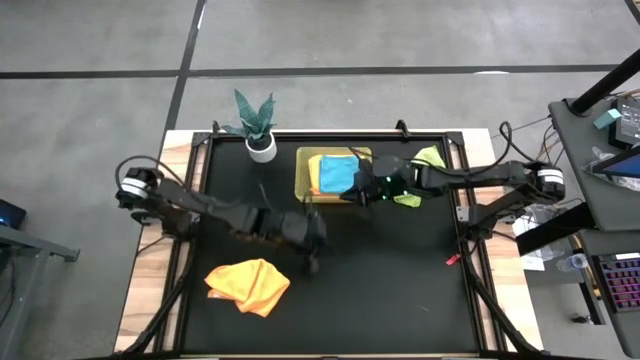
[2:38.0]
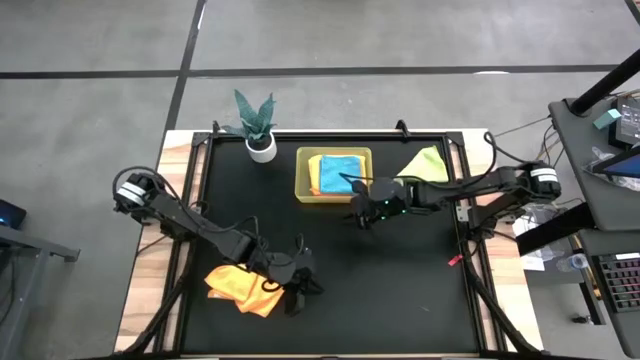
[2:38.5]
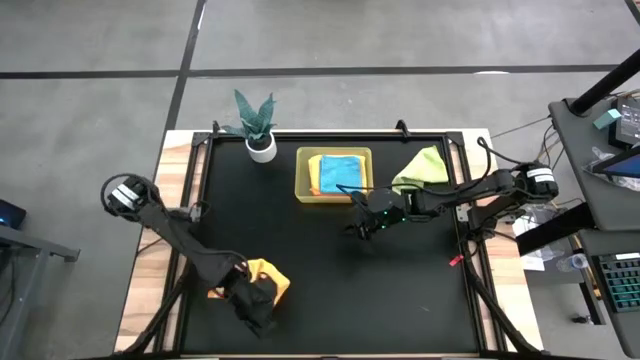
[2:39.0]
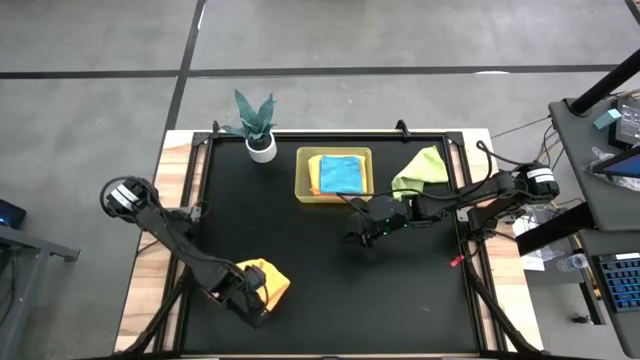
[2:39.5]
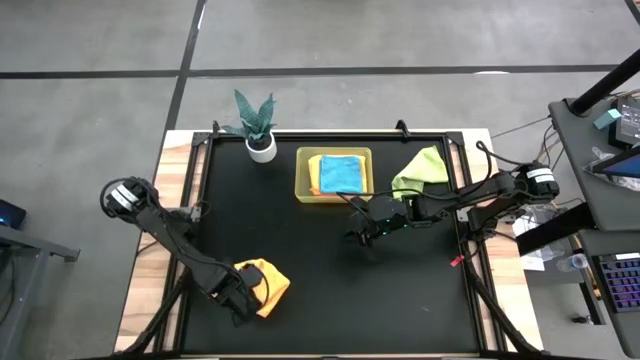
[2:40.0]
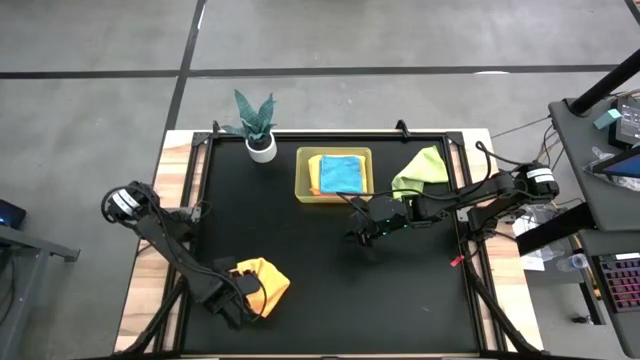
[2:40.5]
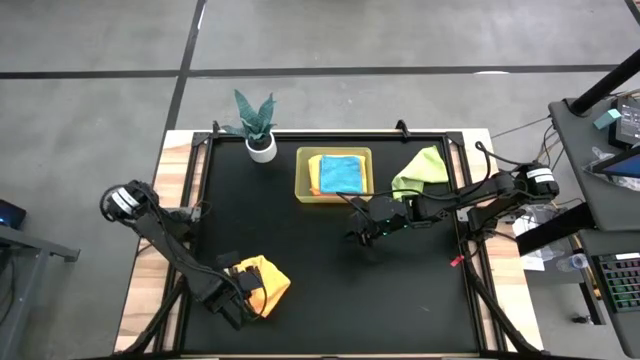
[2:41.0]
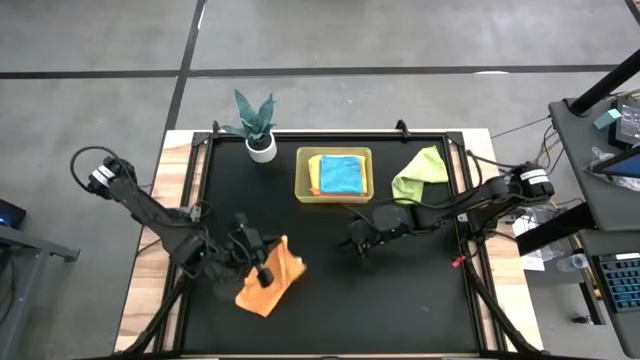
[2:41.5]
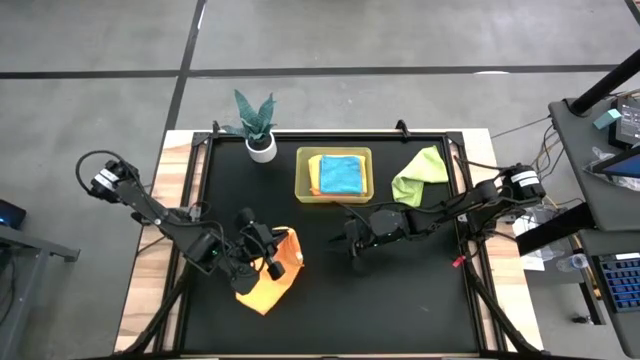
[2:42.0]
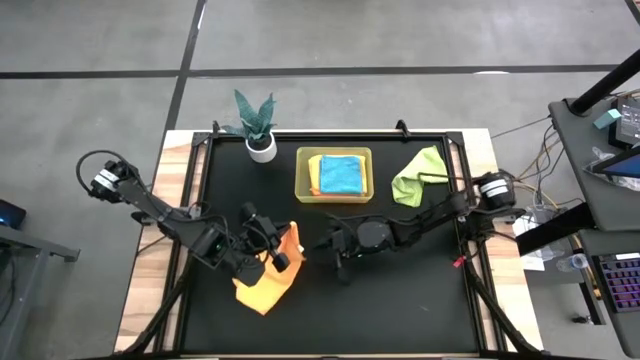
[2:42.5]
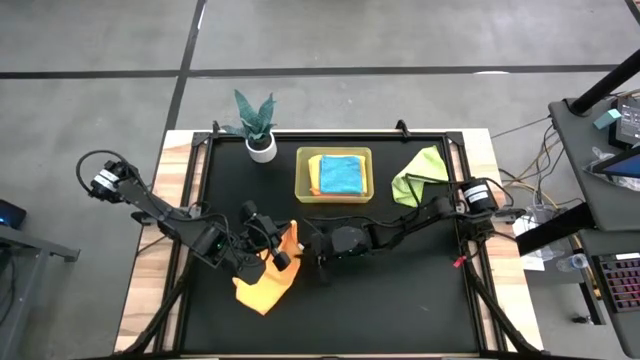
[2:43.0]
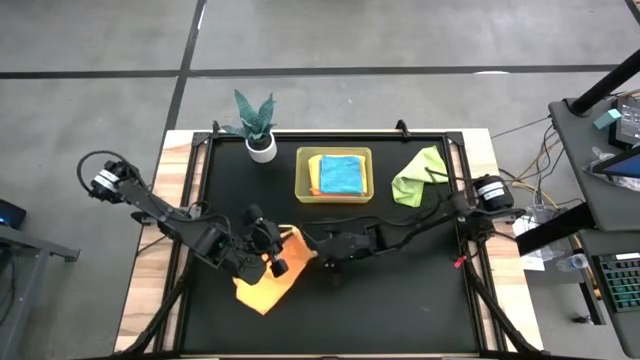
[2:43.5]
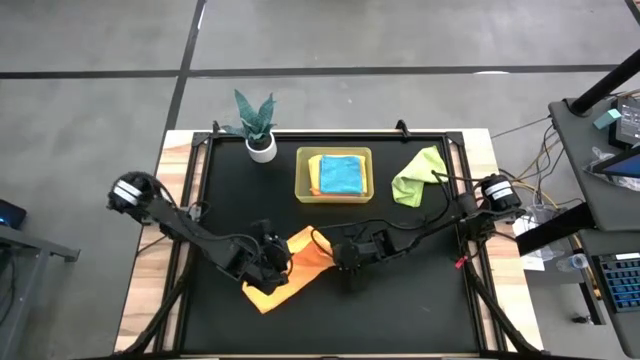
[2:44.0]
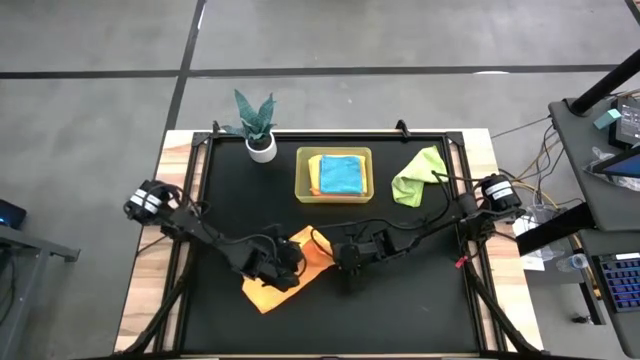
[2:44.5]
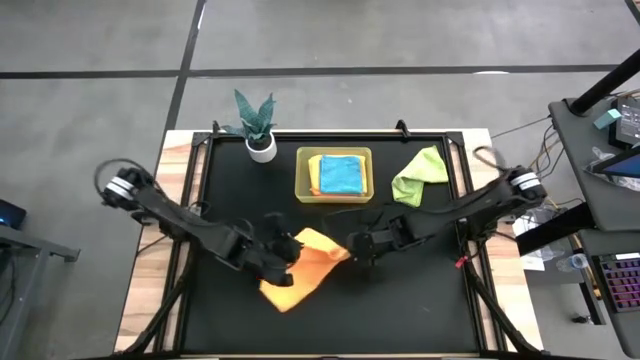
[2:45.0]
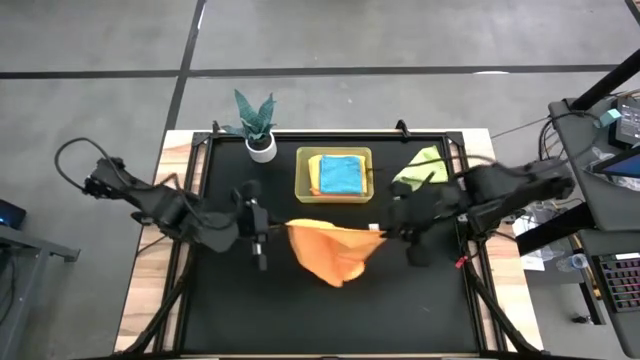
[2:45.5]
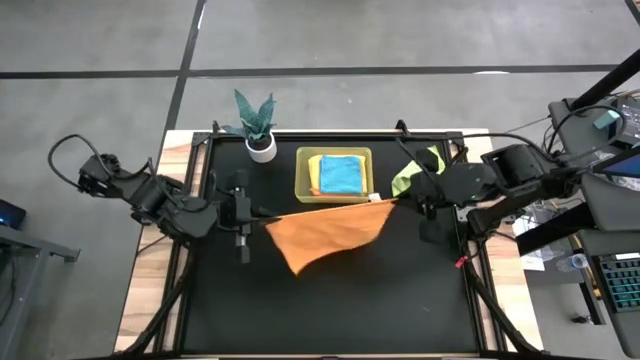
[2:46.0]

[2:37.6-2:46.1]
Task: Fold microfiber towels
Fold the yellow towel on the table
